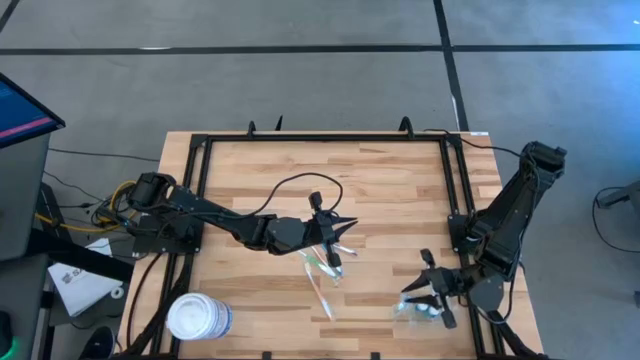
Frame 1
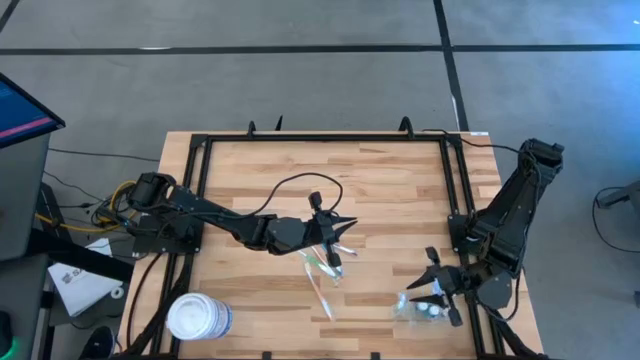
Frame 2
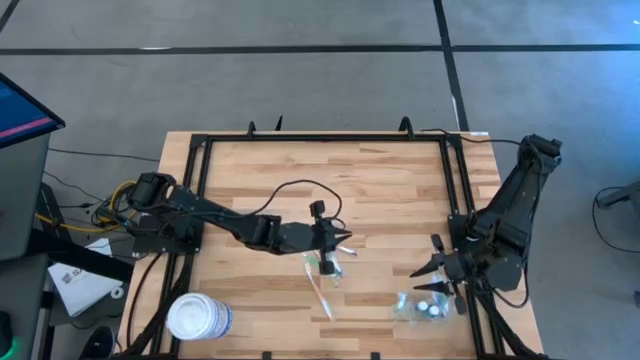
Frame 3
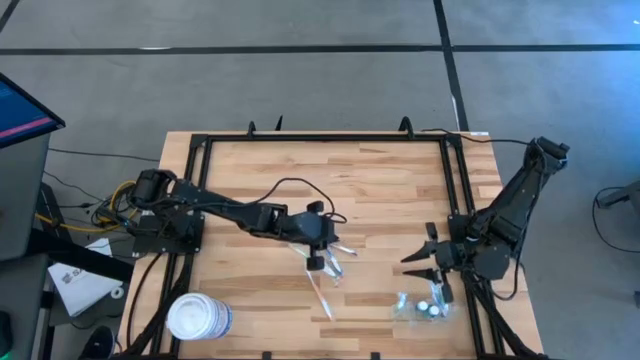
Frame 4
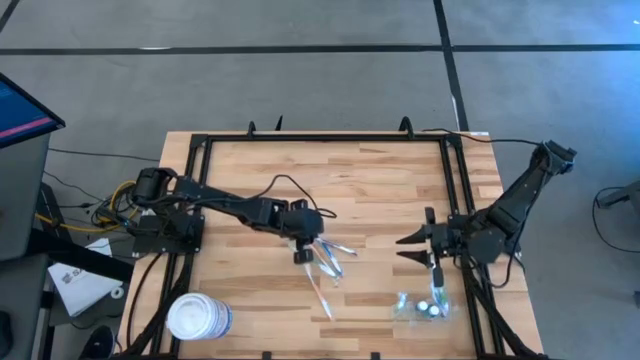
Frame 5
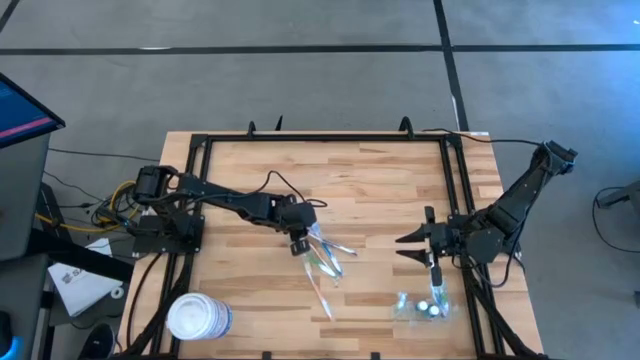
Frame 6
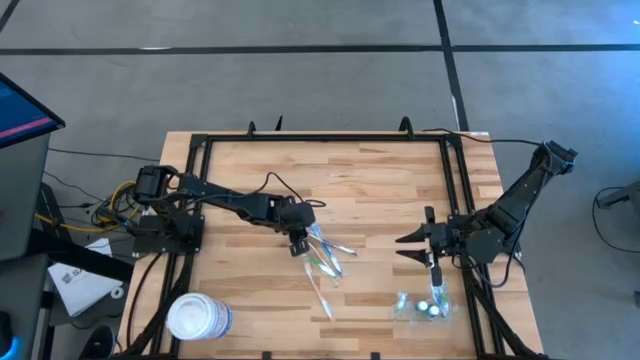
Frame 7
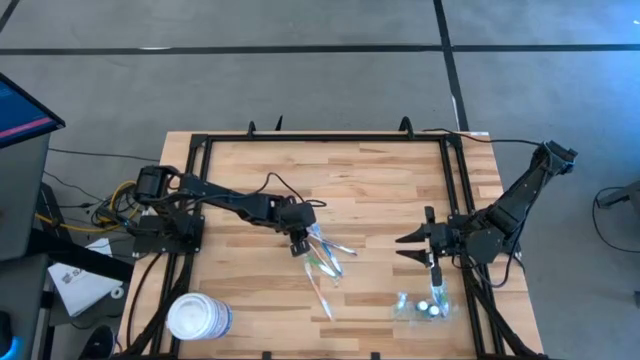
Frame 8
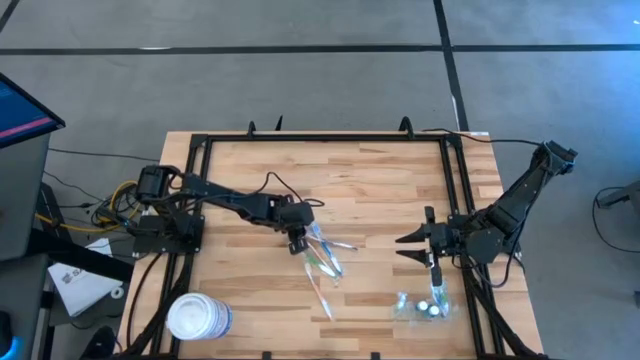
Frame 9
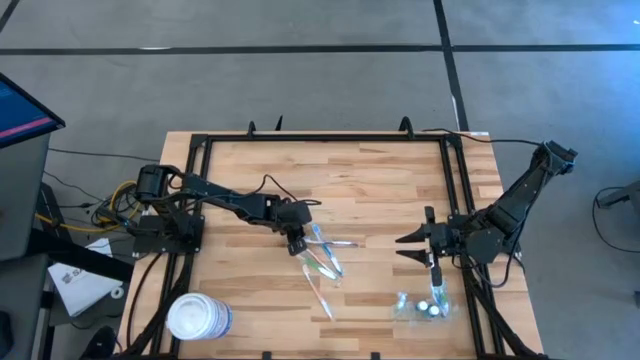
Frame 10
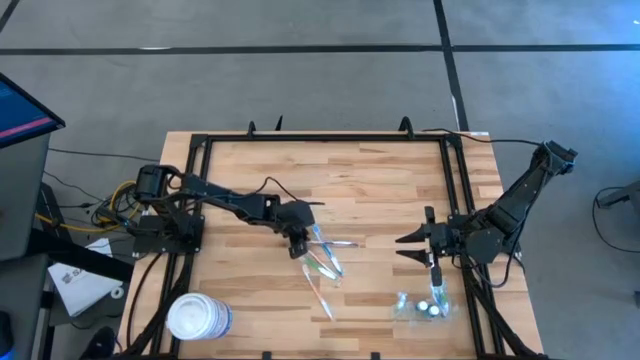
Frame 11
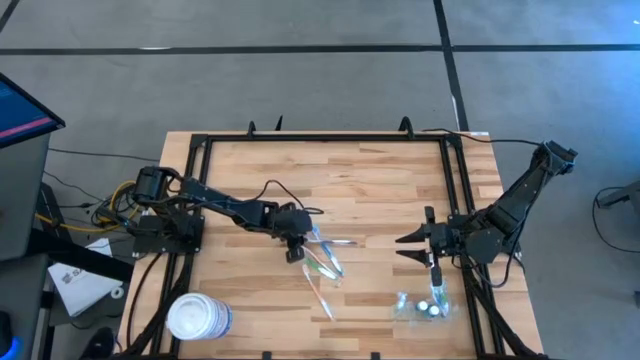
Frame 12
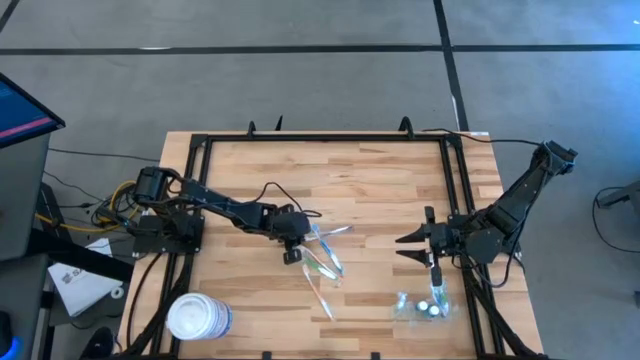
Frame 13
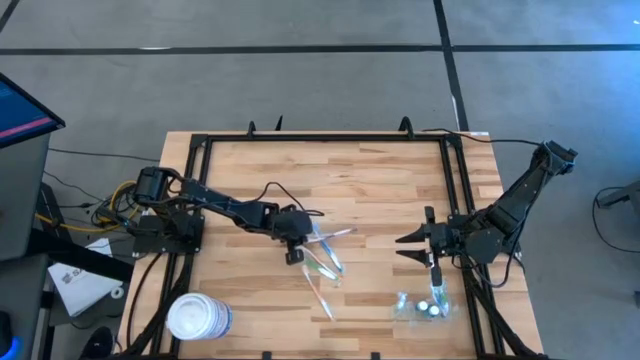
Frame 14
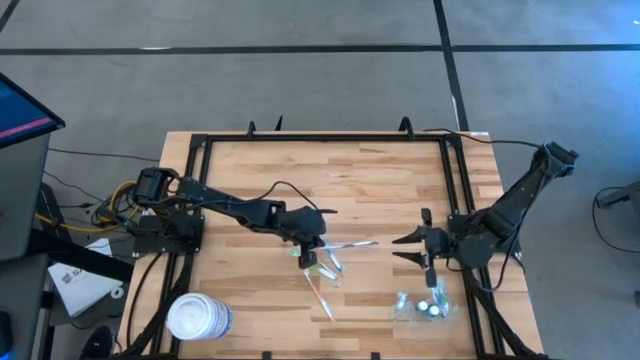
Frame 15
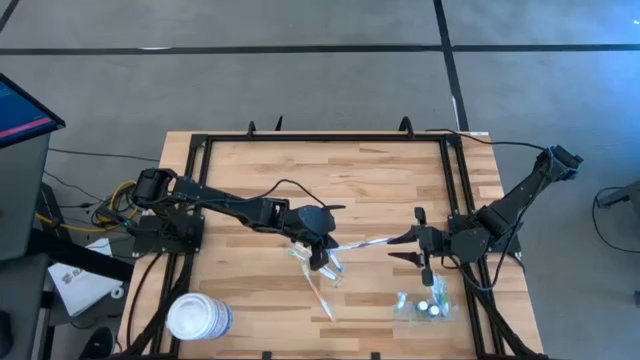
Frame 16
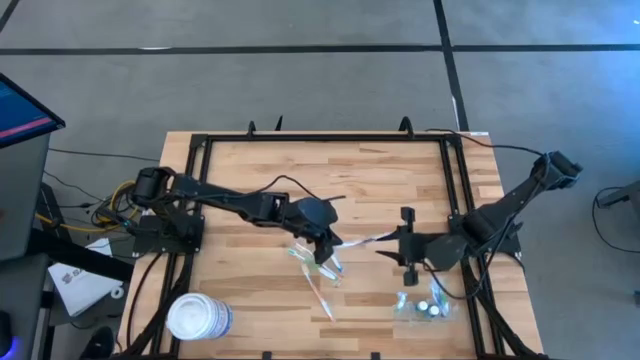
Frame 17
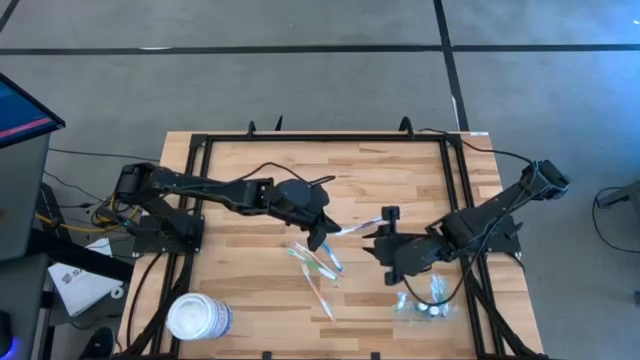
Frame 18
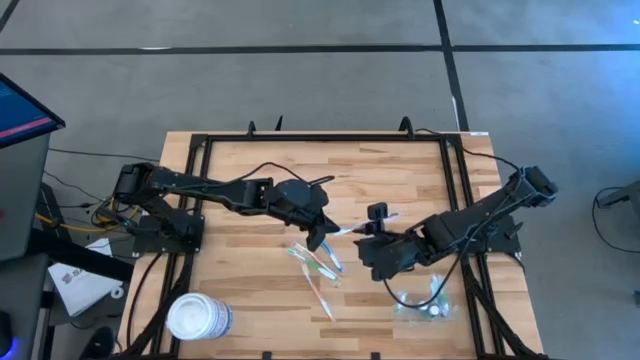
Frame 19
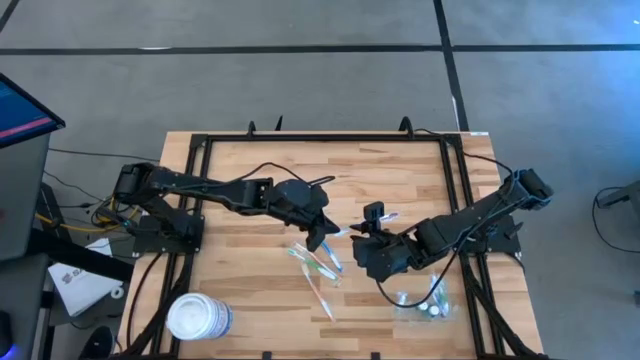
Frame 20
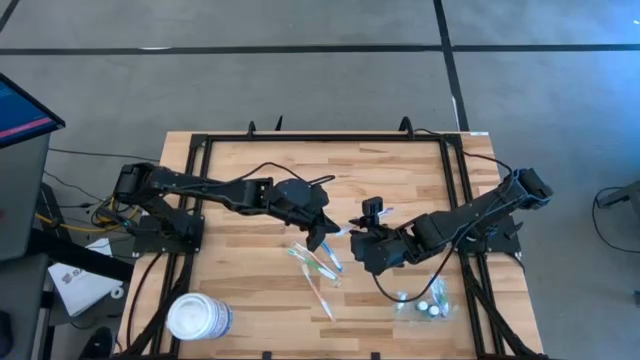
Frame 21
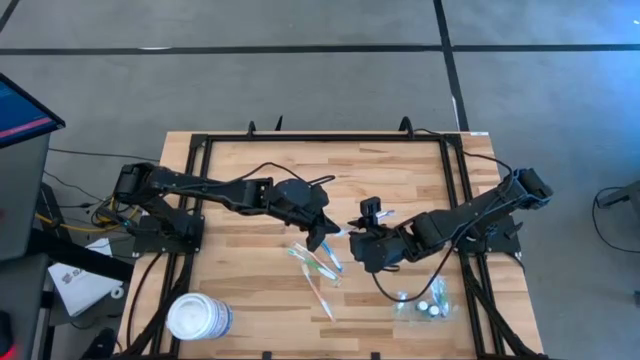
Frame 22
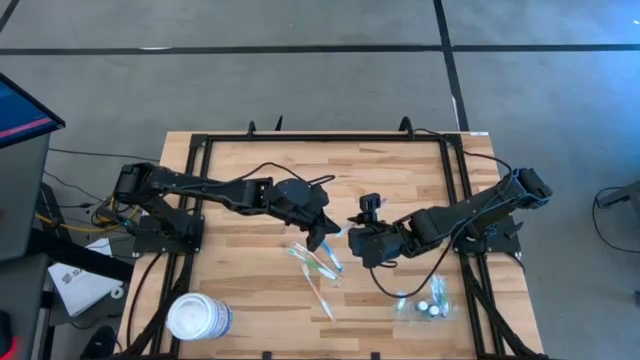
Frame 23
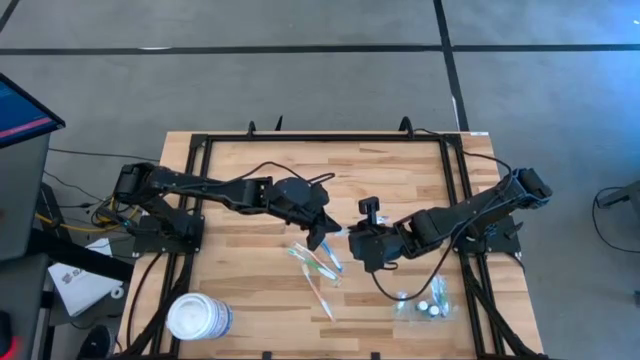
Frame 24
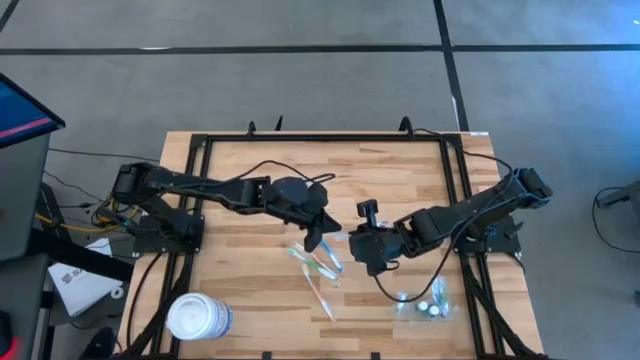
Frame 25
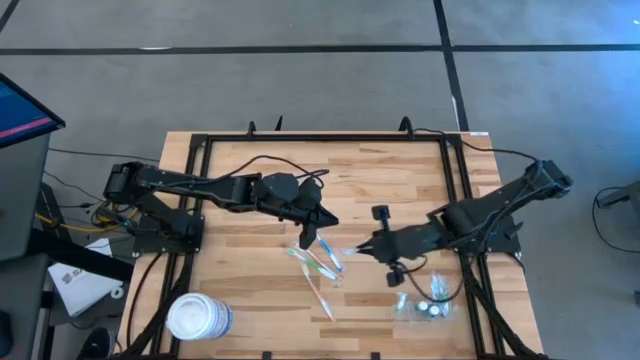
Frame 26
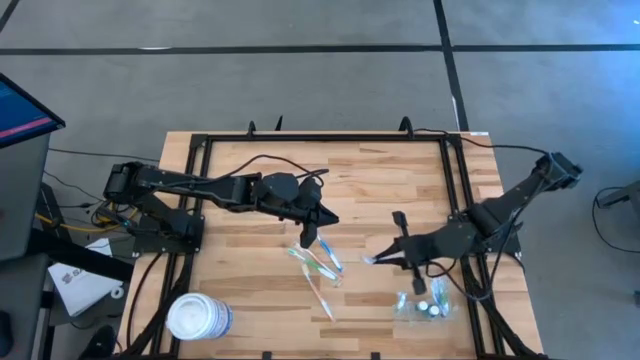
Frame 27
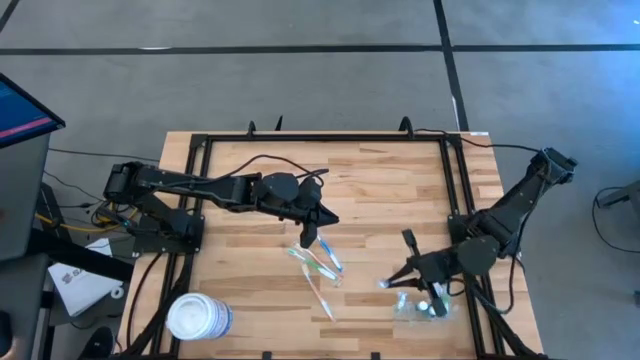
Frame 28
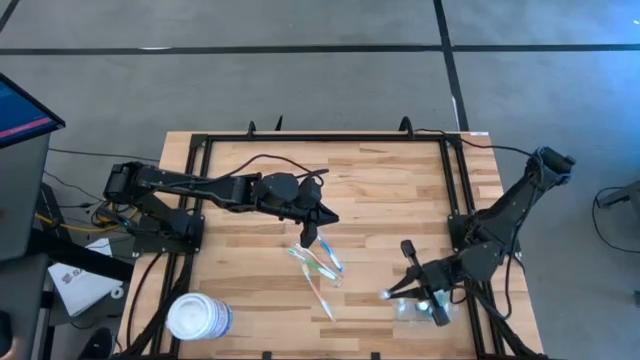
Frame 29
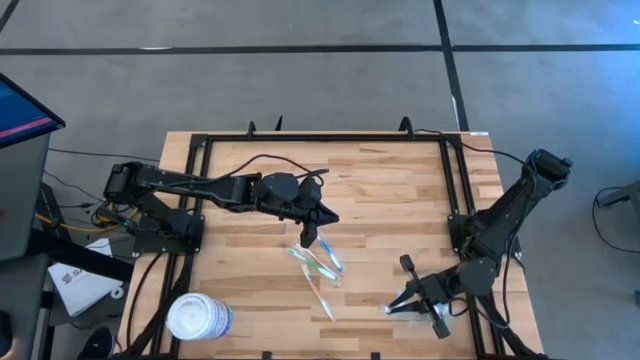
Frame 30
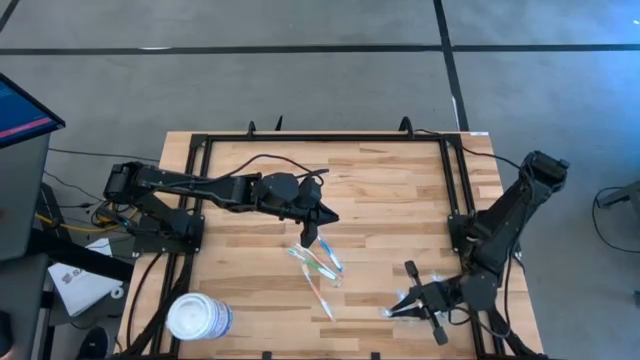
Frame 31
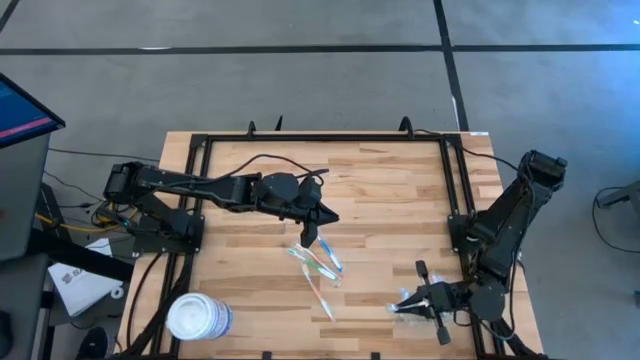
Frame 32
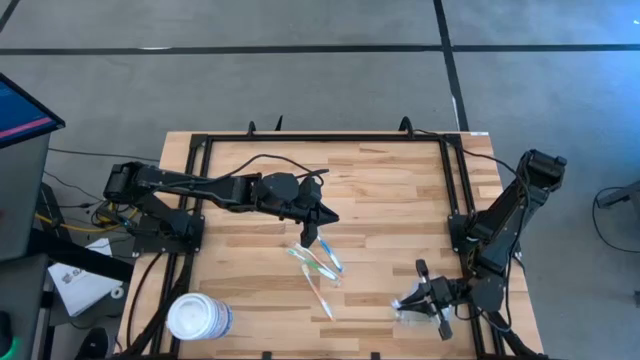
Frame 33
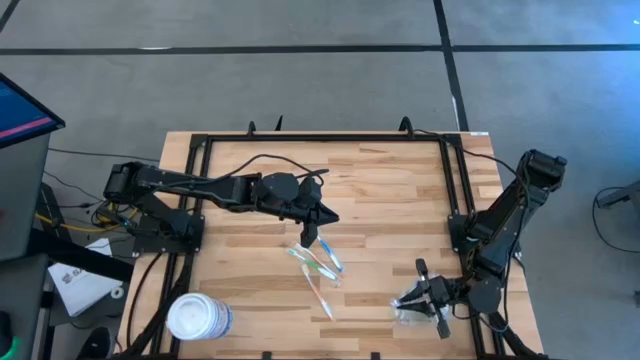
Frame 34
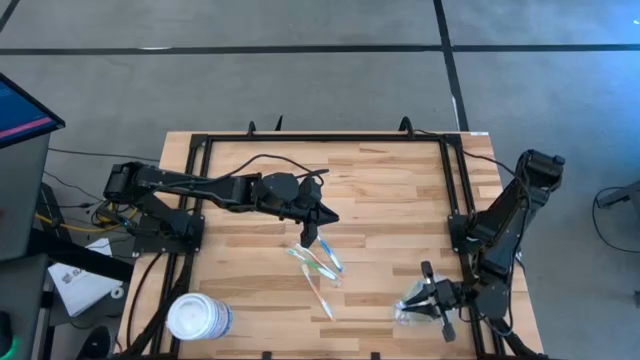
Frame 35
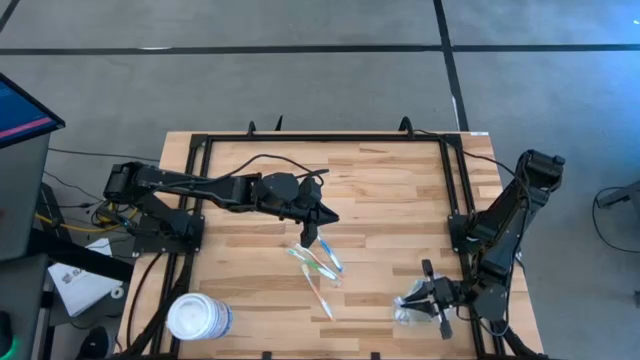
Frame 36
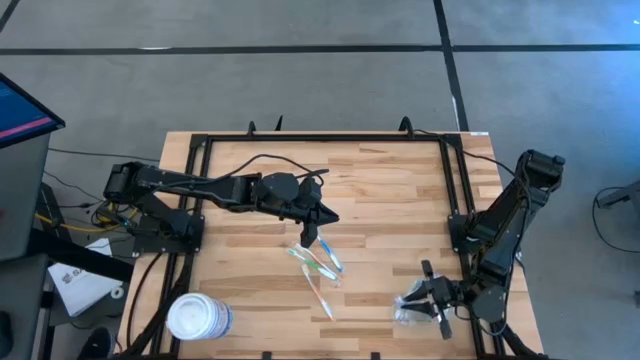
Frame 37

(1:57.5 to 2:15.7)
Task: Pick & Place toothbrushing station
Put the purple toothbrush into the transparent organizer

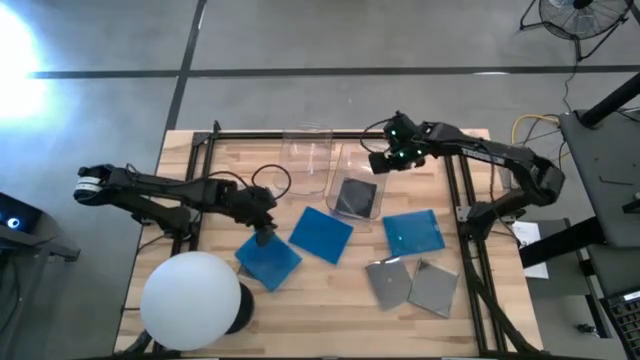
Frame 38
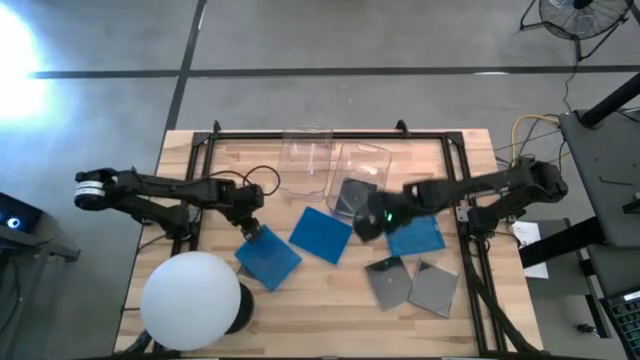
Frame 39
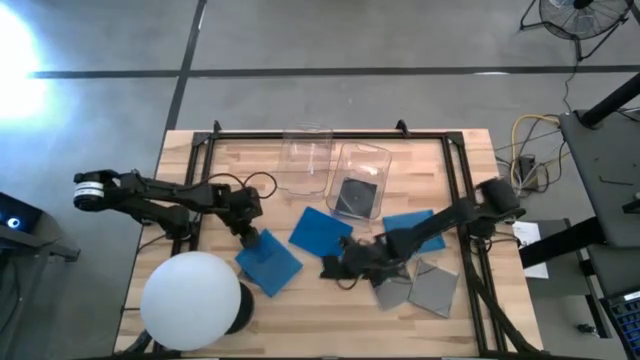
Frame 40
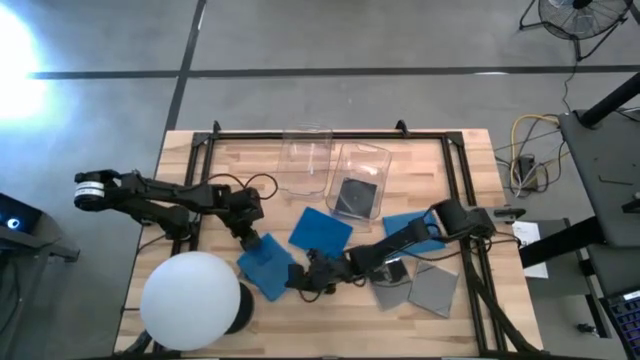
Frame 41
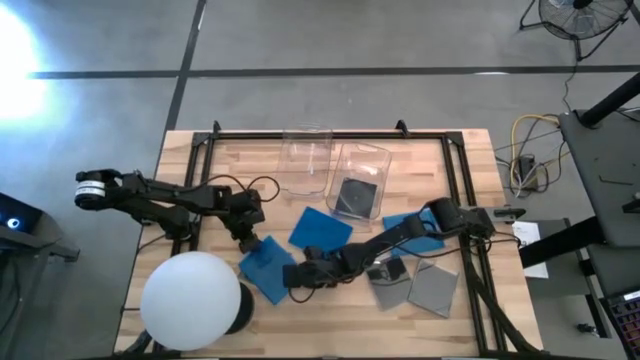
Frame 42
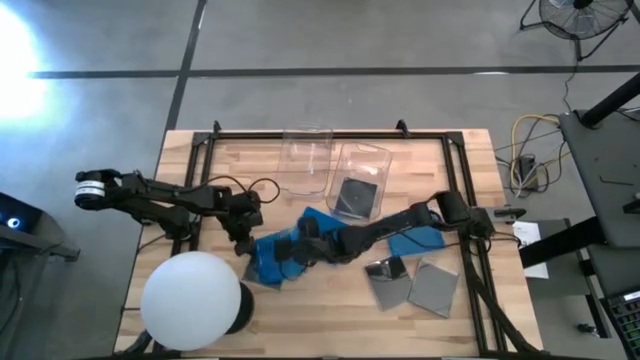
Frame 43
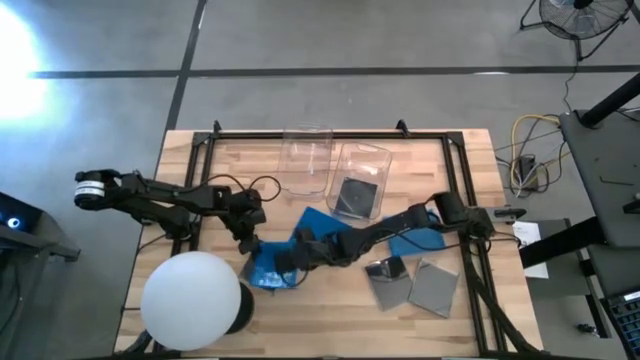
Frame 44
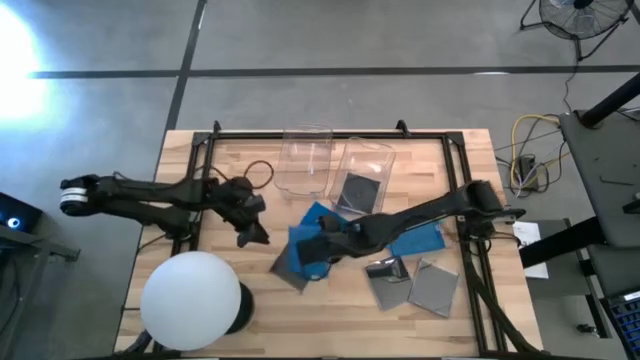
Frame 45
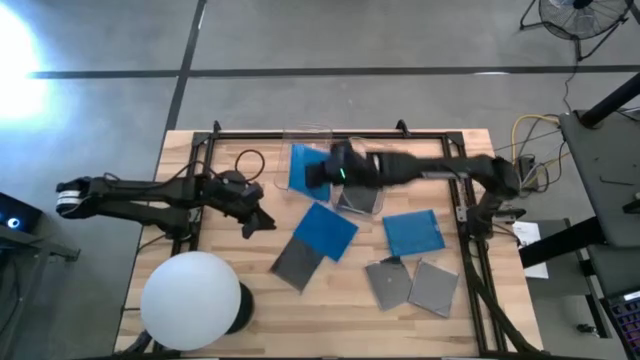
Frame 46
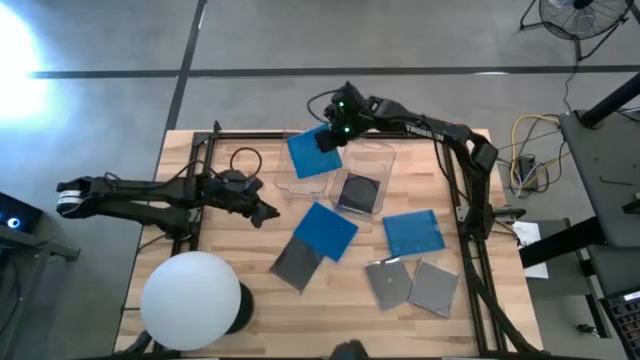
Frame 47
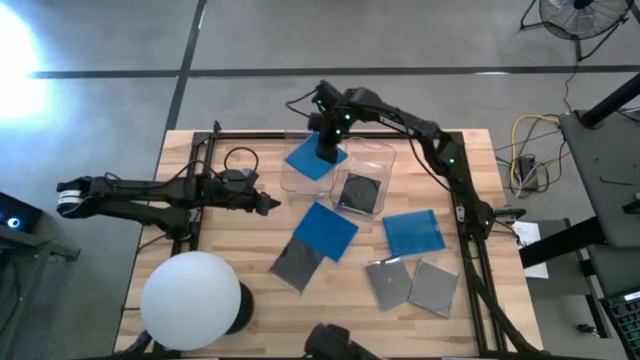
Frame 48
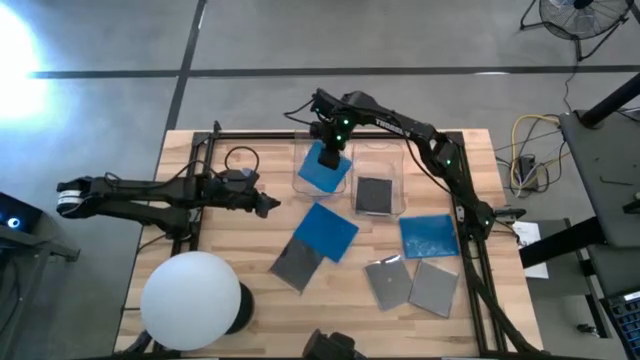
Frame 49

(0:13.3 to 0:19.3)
Task: Pick & place jewel cases by type
Put the blue CD case into the left transparent bin
